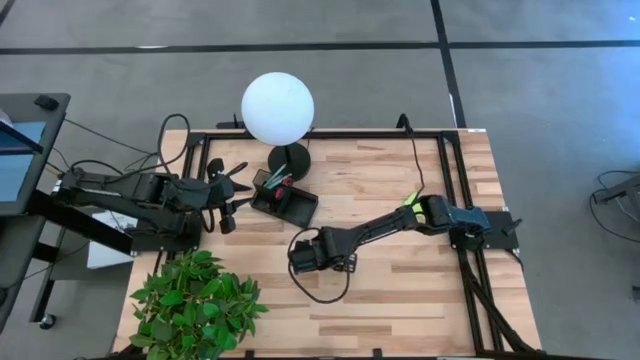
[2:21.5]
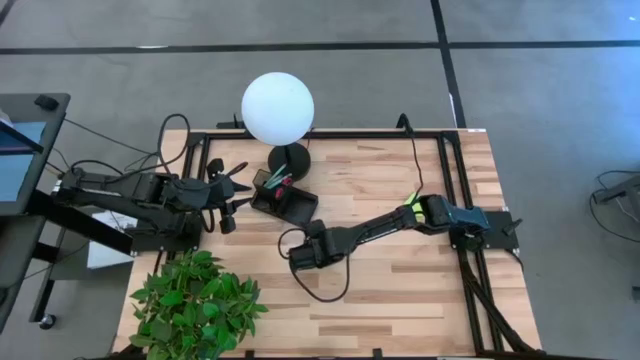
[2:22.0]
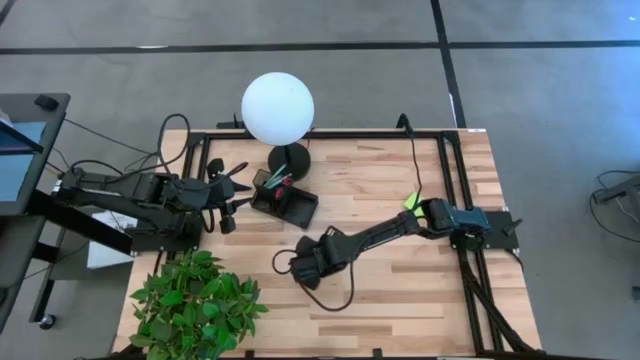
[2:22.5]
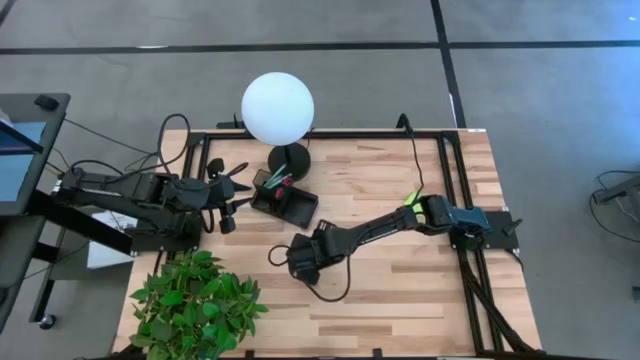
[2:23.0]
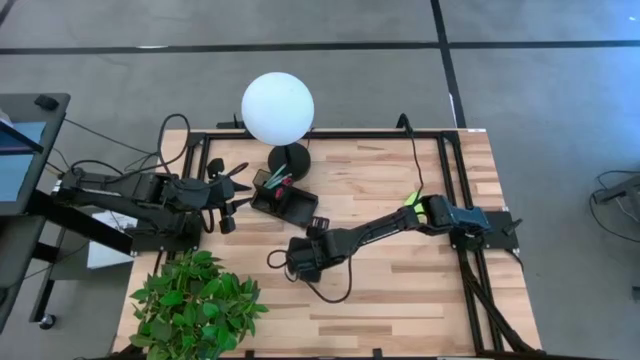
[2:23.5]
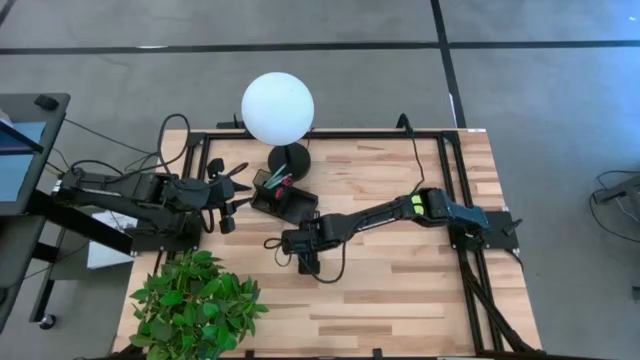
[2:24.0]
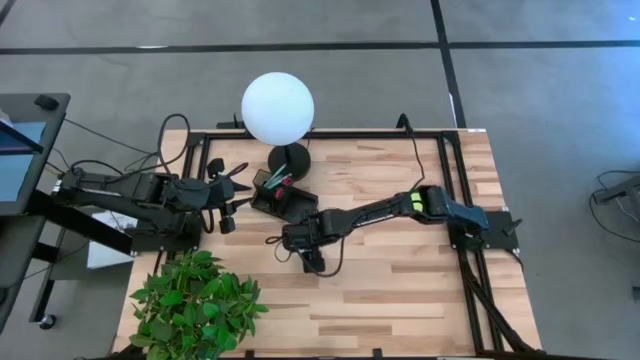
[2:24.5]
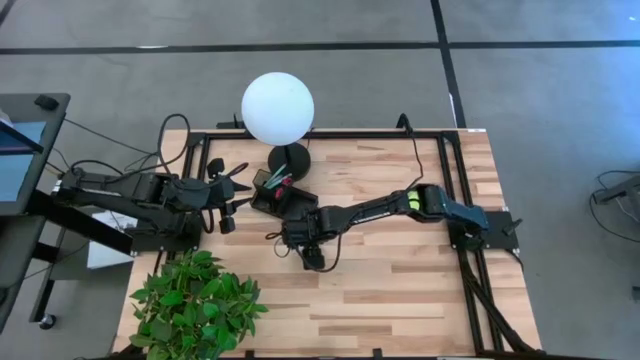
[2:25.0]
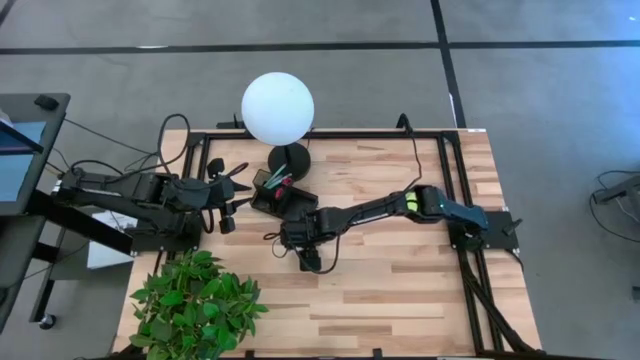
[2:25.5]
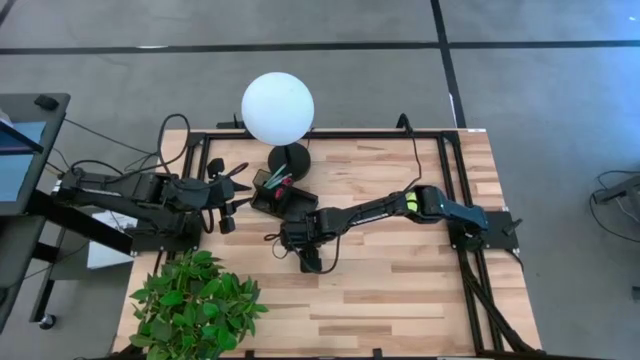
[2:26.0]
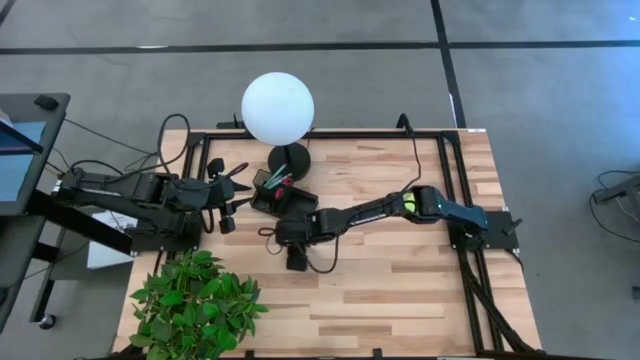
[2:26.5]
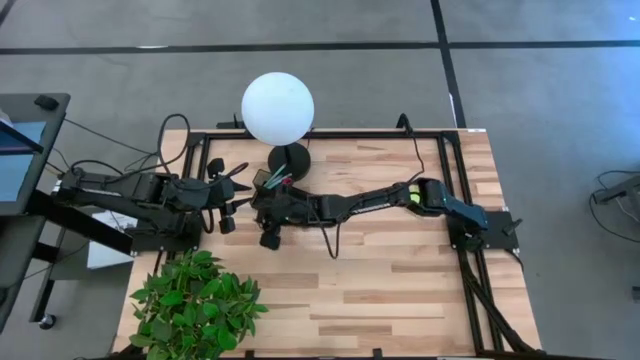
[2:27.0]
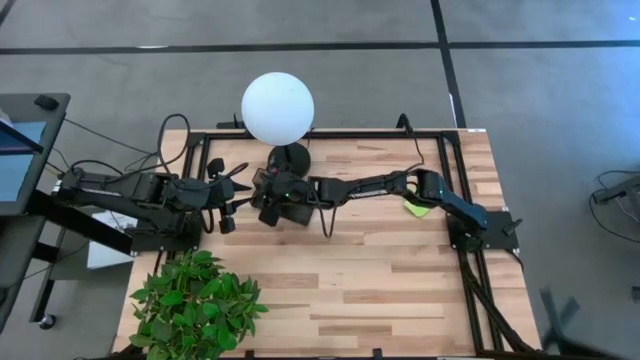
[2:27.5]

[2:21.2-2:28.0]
Task: Pick and place office supplies into organizer
Put the black binder clip into the black desk organizer

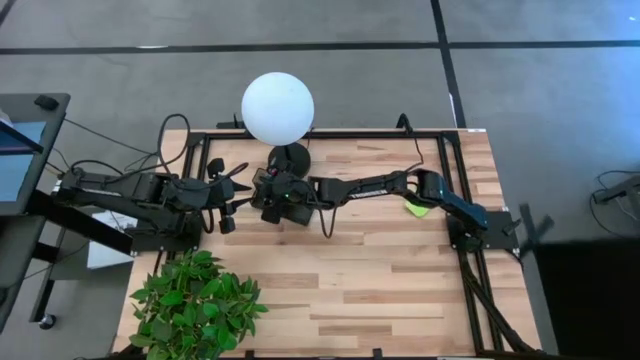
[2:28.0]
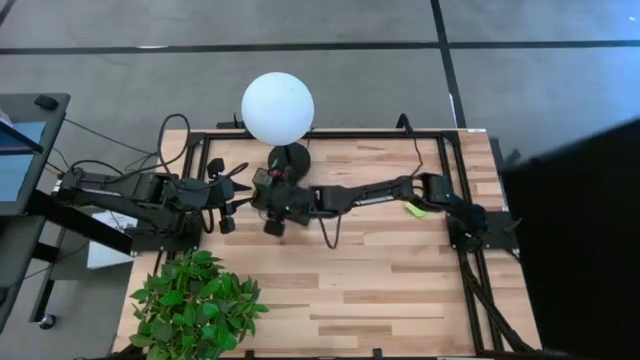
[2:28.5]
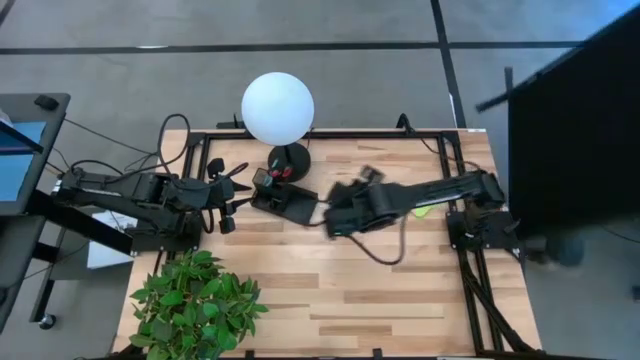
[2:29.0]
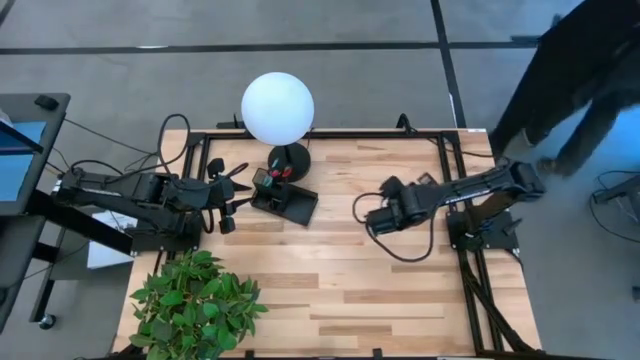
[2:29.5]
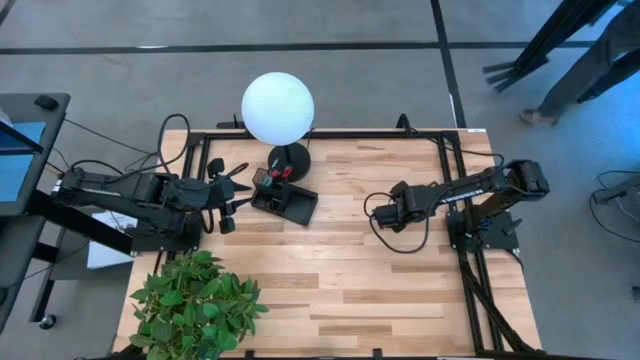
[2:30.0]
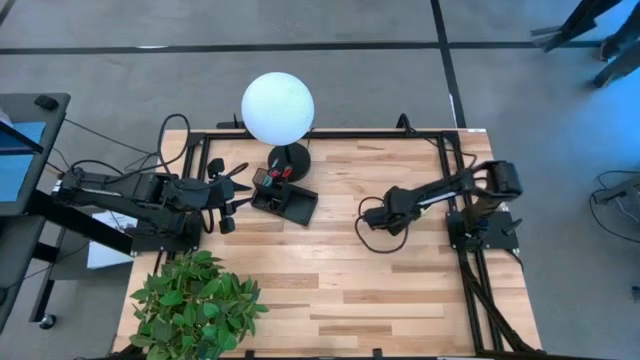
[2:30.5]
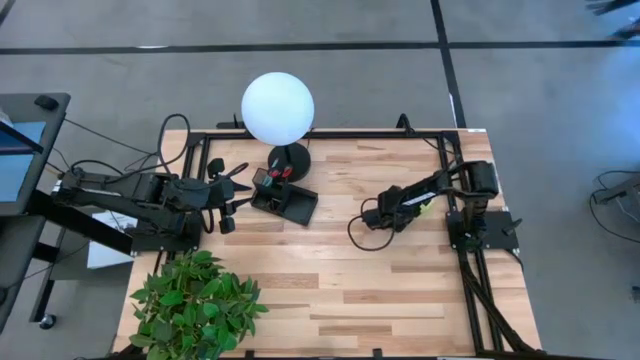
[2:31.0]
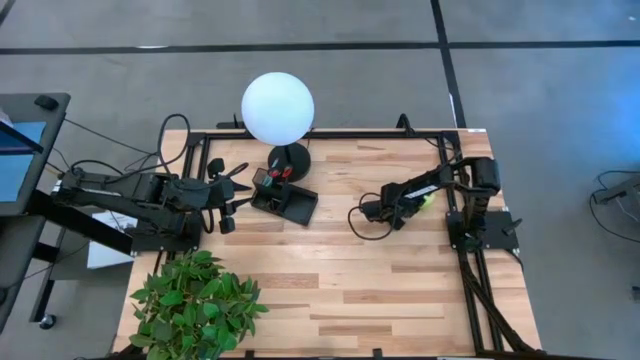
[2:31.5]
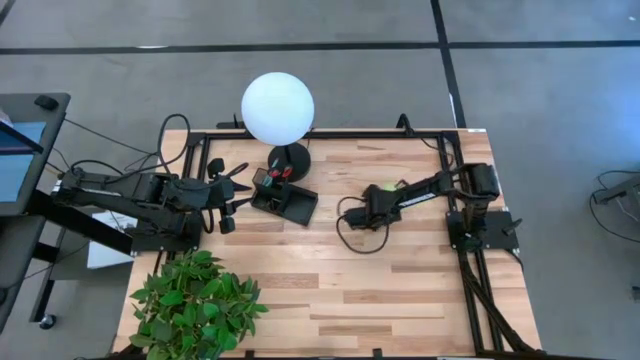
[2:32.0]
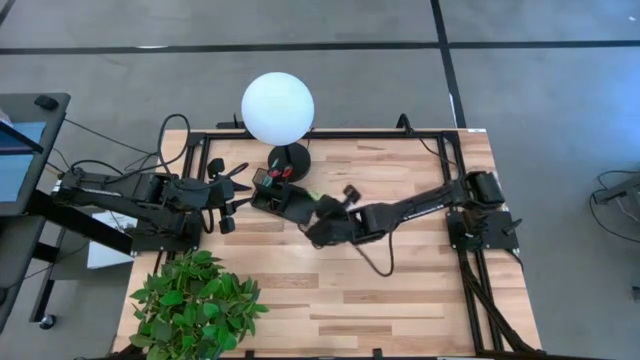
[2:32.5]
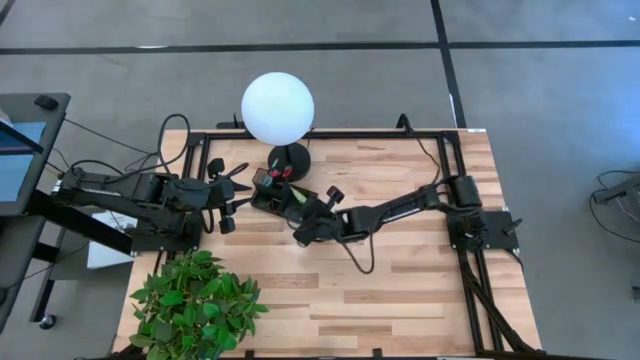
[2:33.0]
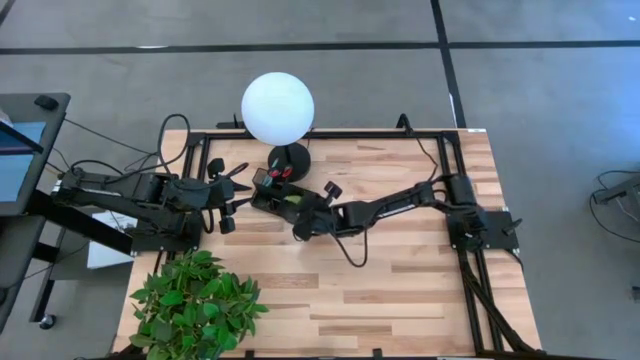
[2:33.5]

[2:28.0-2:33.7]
Put the green sticky note into the black desk organizer

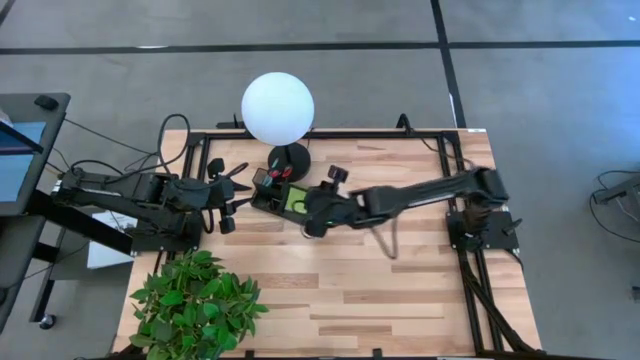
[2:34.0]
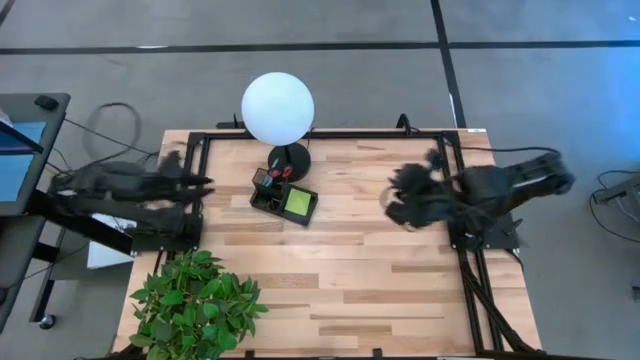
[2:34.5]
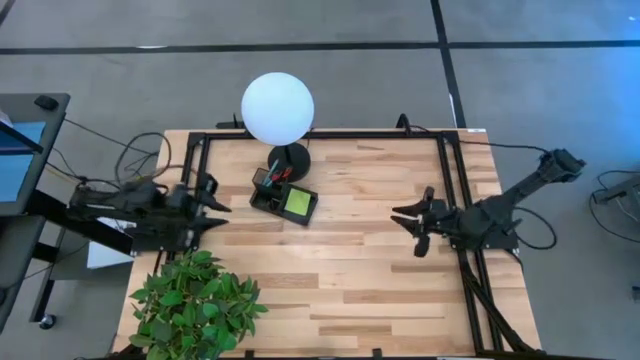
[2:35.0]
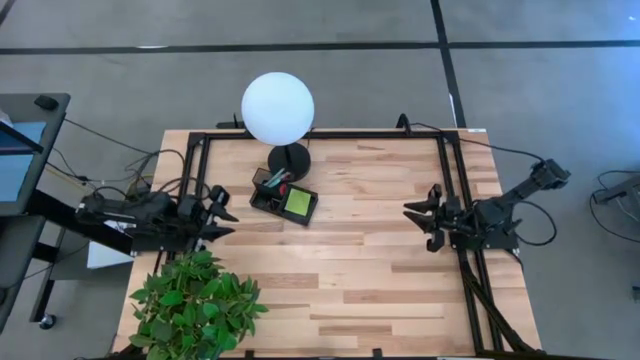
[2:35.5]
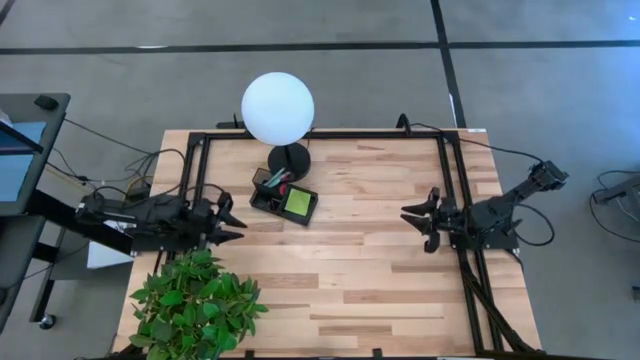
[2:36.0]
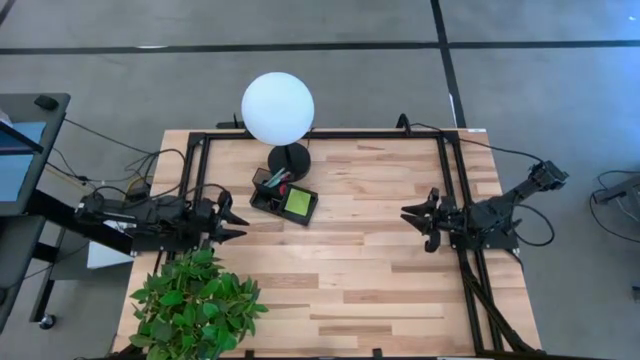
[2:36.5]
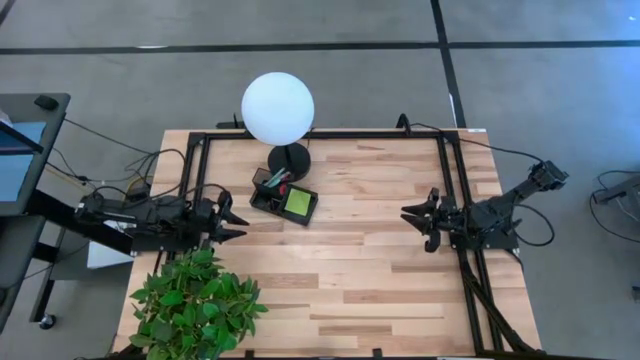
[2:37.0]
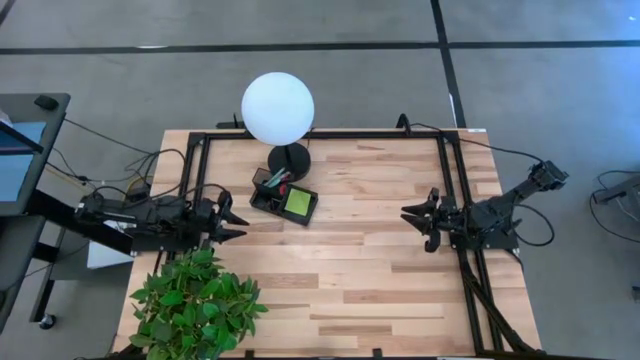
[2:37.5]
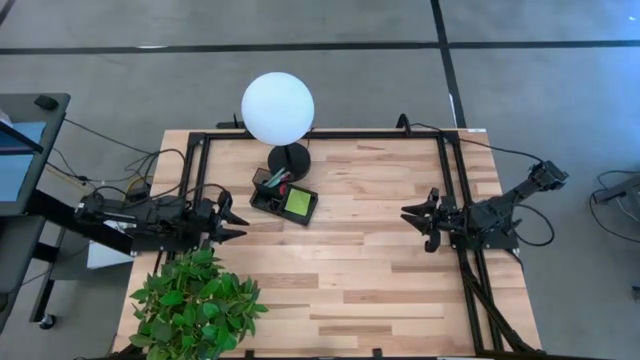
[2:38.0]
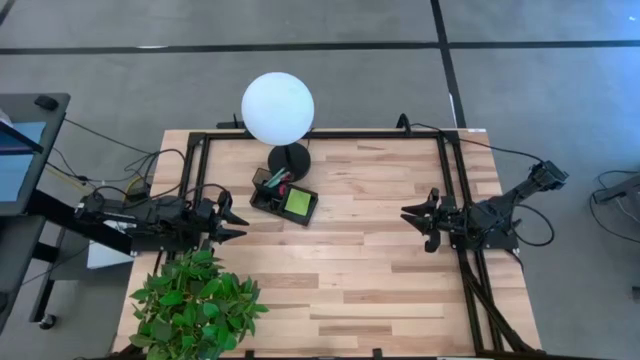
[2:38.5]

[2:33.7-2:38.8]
Return to Home Position

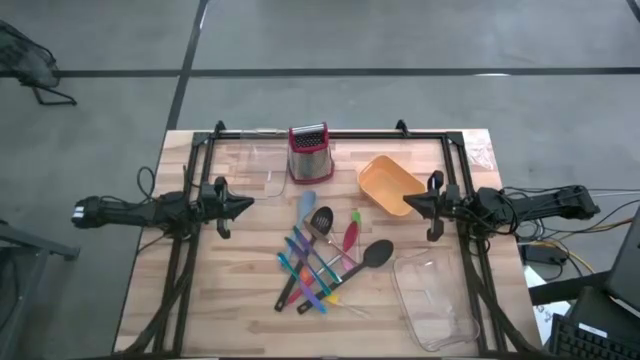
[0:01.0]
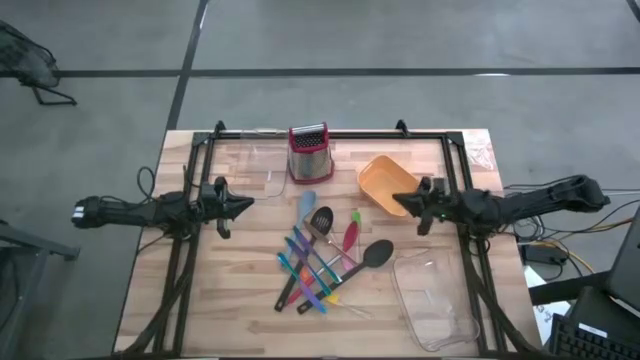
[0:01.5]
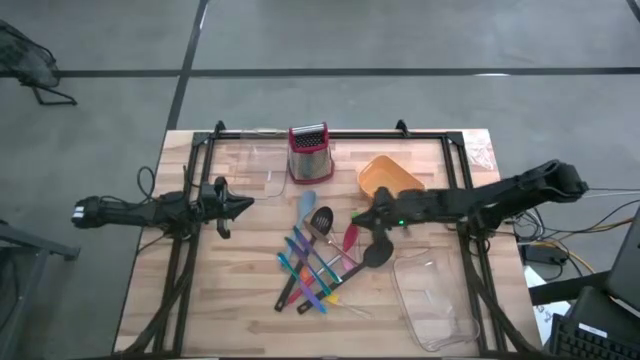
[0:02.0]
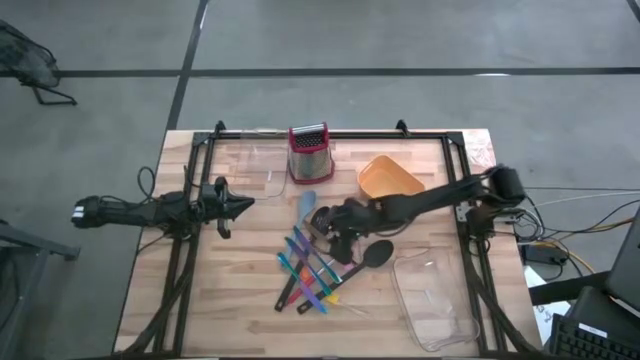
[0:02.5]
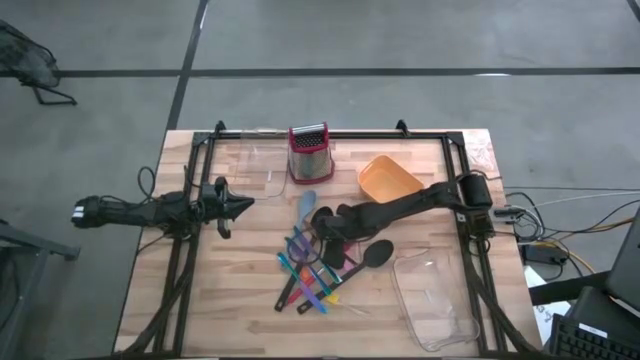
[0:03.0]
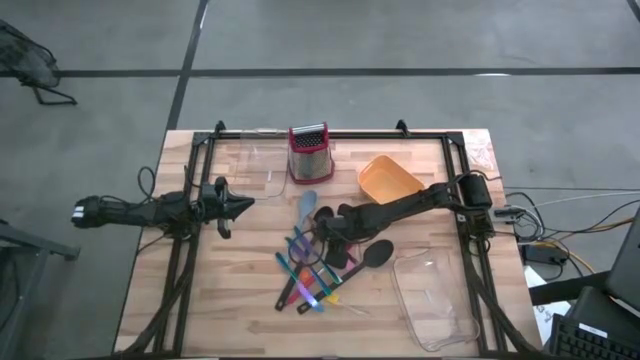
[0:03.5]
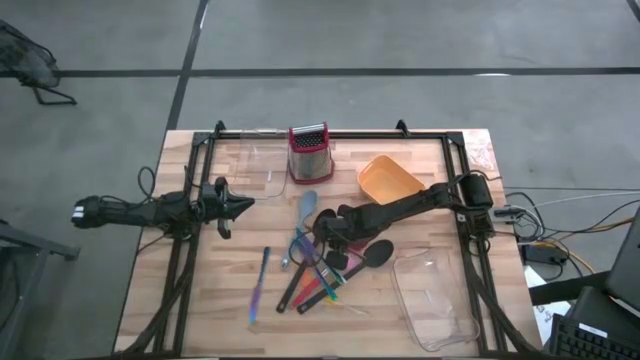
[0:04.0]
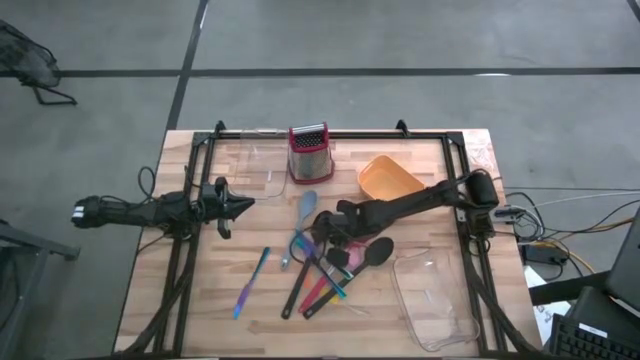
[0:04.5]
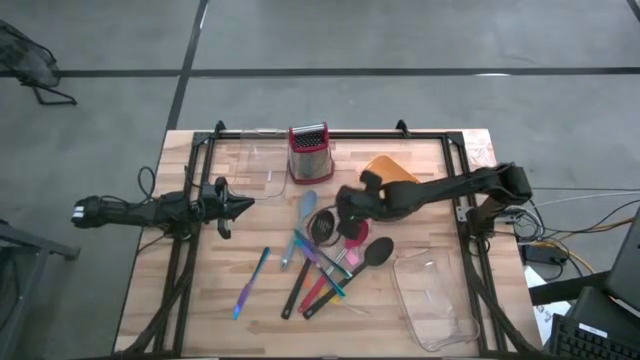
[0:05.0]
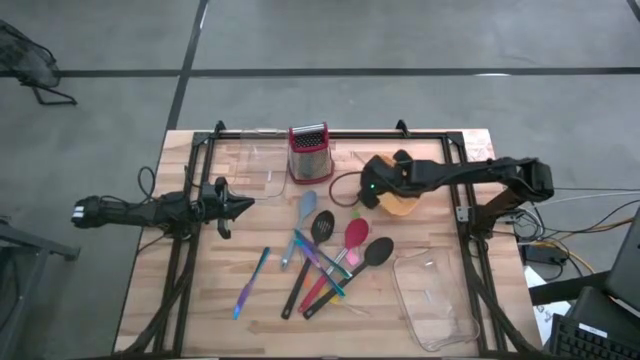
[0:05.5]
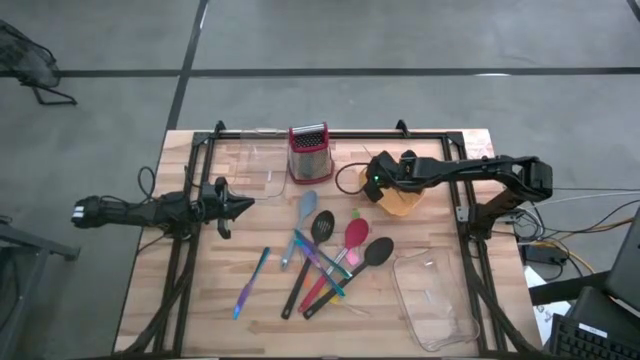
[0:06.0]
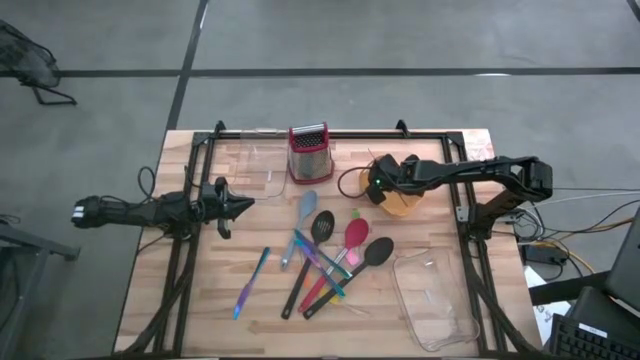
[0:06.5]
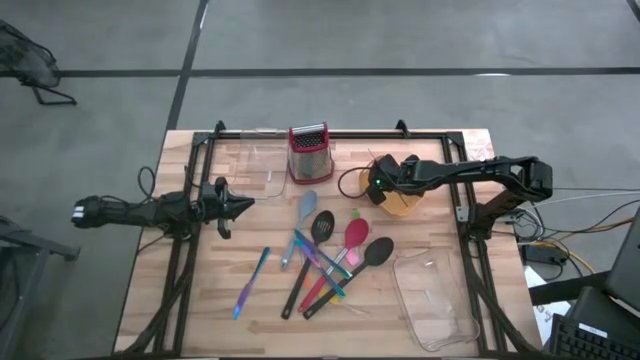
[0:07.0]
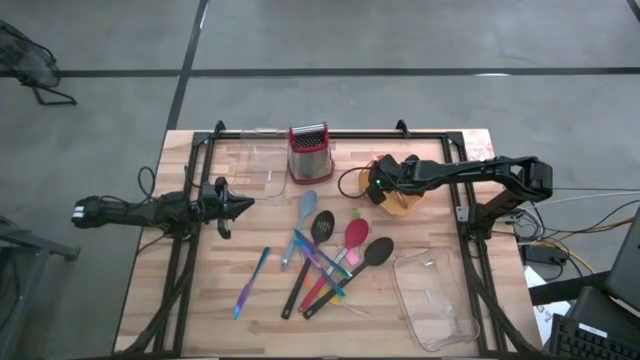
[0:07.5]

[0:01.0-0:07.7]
Task: Pick & Place Kitchen Items
Put the gold table knife into the orange bin
